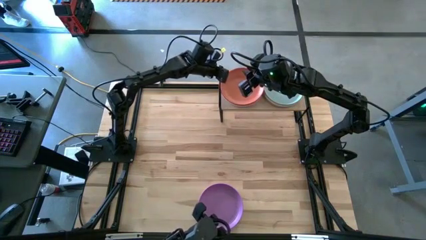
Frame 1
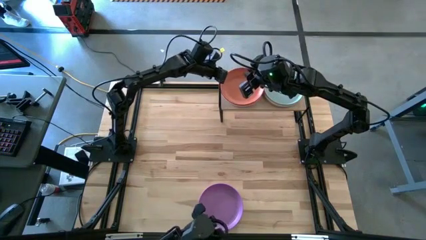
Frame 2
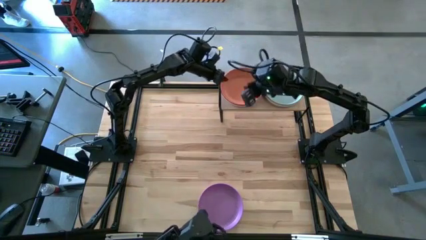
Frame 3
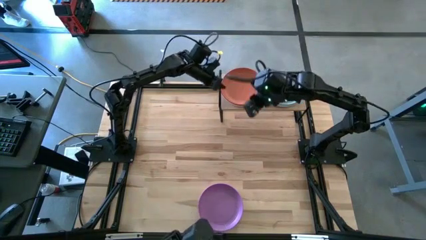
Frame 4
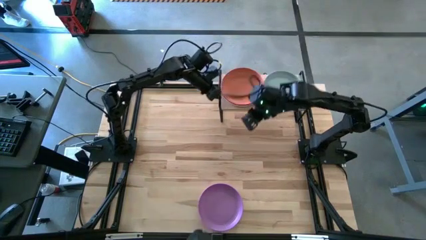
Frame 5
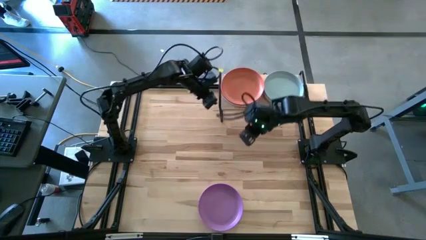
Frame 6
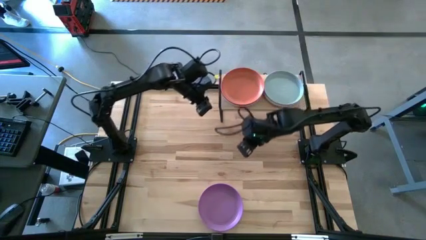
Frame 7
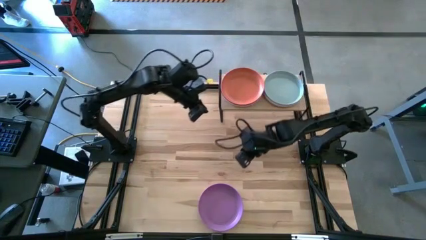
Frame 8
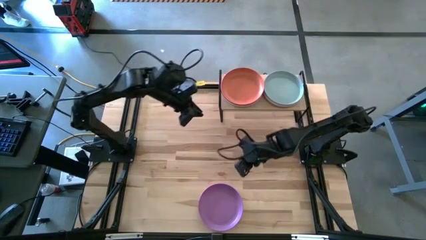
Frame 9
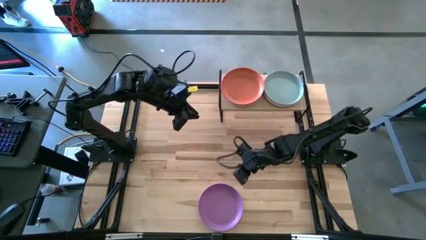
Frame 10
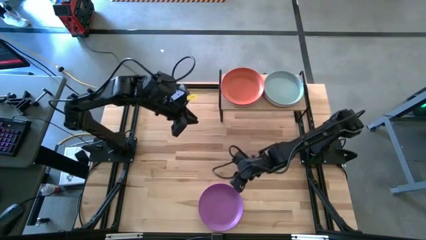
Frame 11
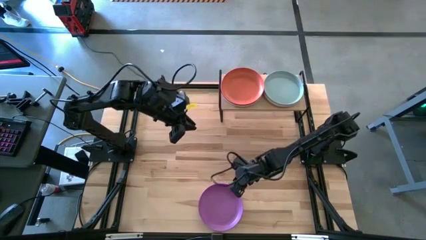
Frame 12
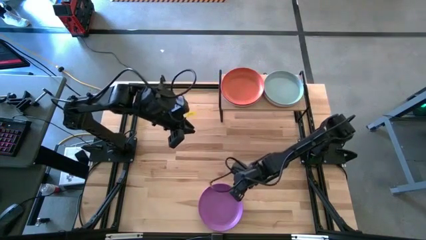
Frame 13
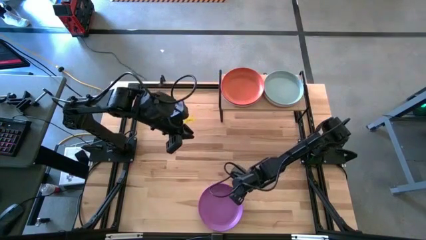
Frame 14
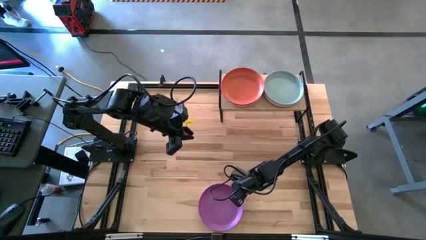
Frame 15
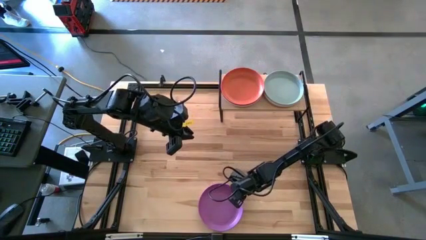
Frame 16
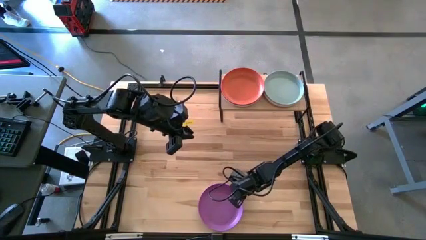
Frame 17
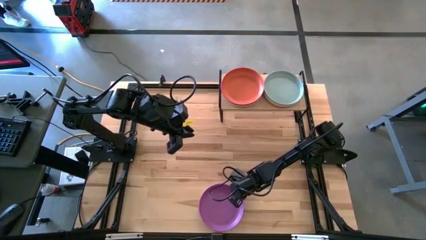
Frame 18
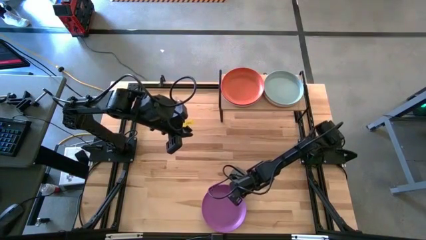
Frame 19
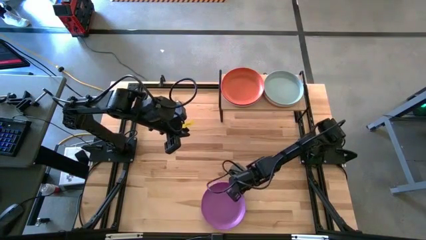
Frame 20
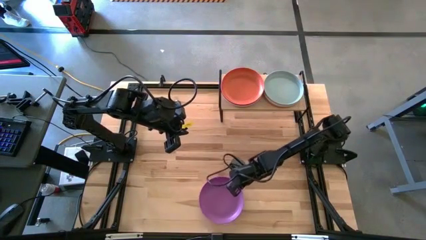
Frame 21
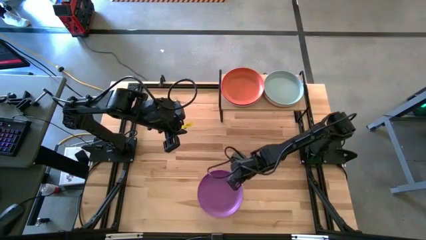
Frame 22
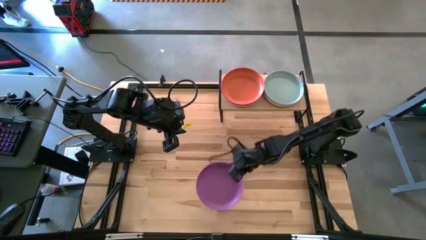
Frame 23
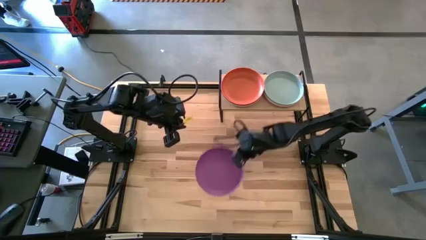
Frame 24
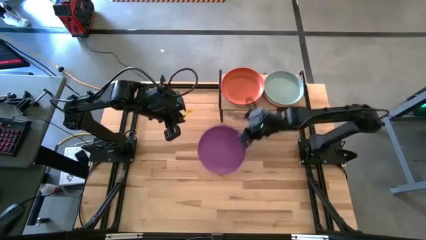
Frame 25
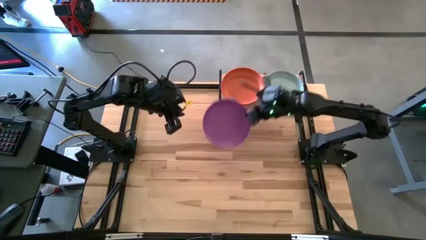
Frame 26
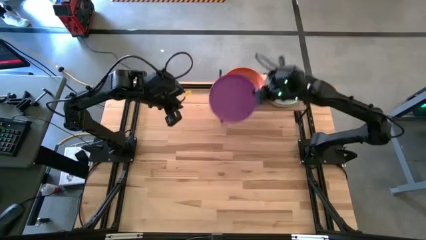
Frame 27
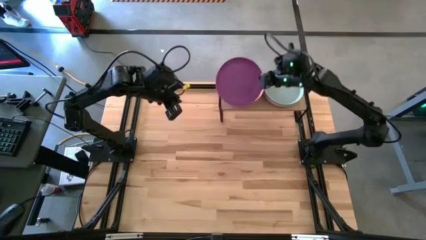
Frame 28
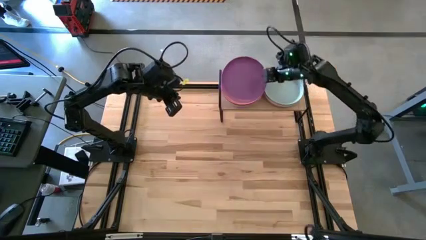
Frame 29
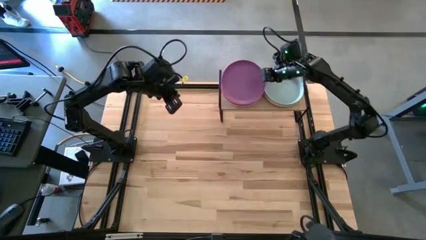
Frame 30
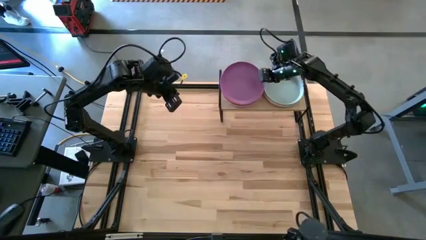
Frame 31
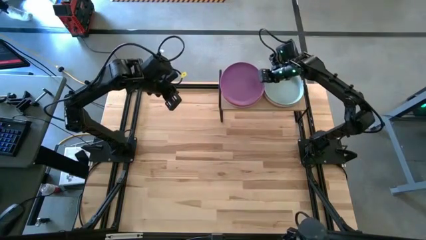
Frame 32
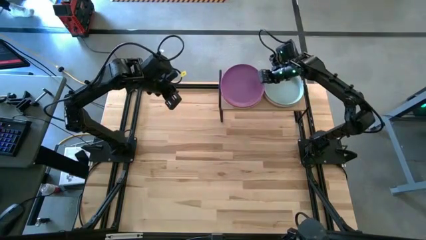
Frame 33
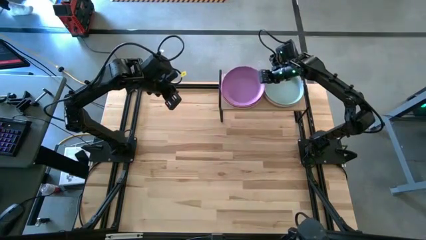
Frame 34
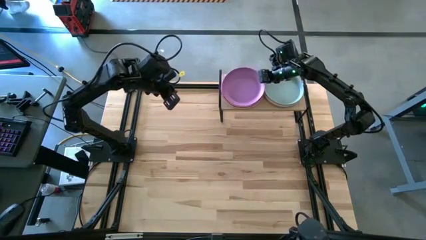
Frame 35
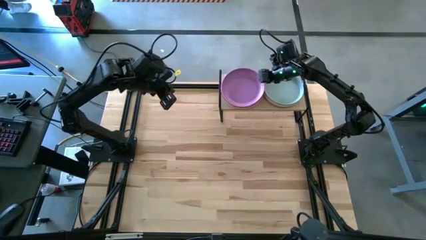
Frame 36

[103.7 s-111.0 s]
Task: Place and stack plates onto a shelf
Stack the purple plate on top of the orange plate on the shelf

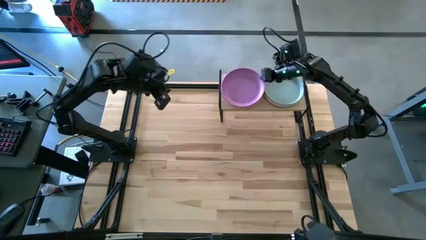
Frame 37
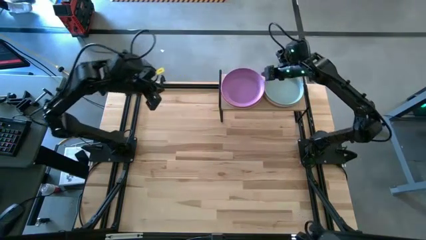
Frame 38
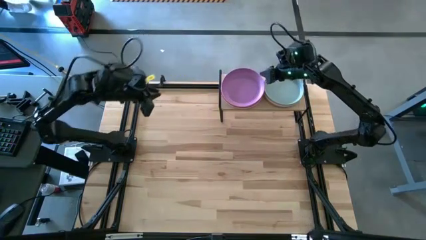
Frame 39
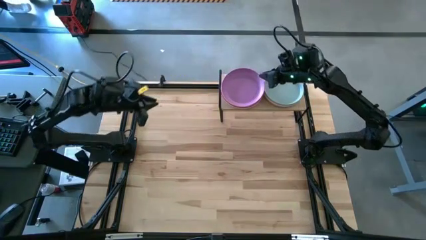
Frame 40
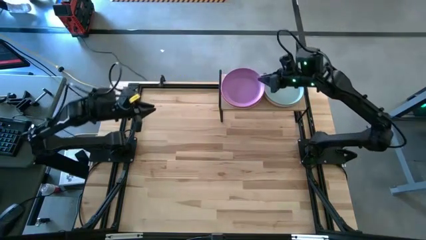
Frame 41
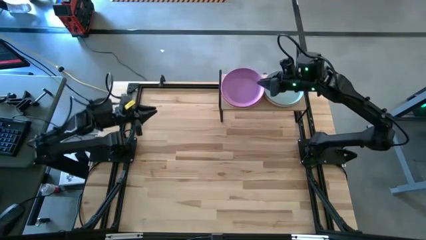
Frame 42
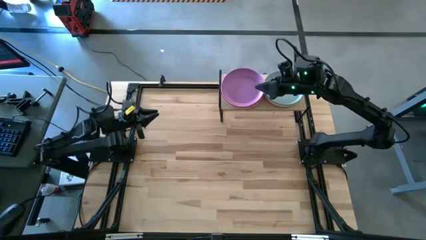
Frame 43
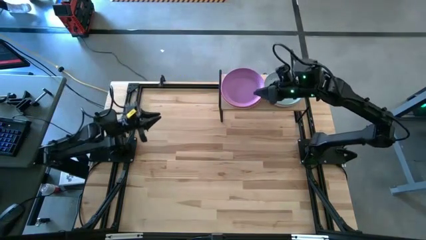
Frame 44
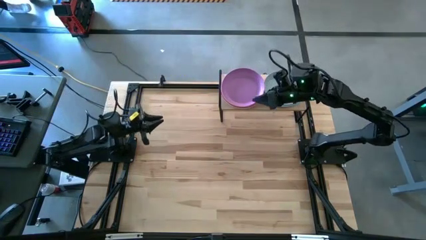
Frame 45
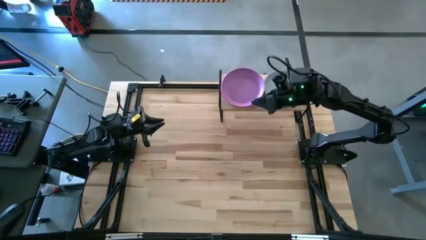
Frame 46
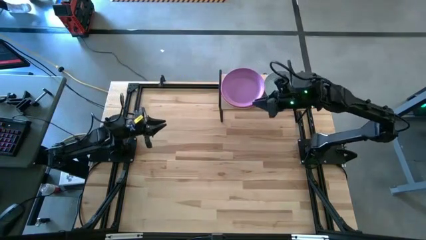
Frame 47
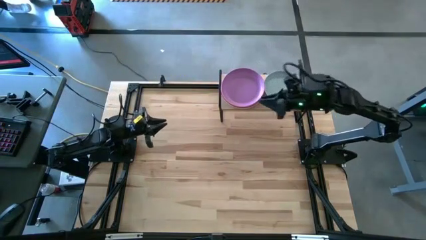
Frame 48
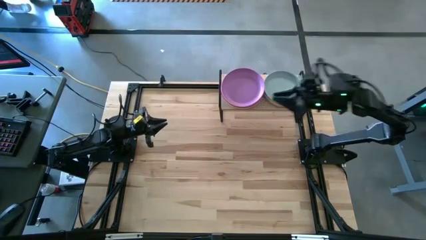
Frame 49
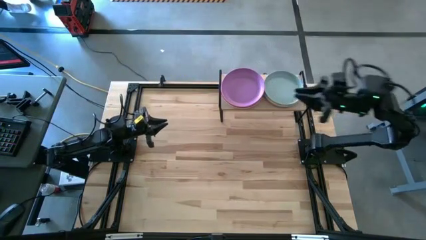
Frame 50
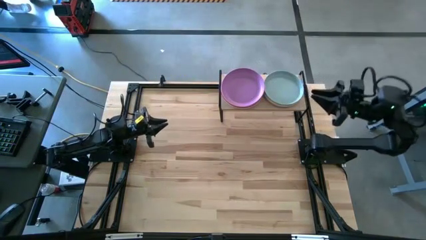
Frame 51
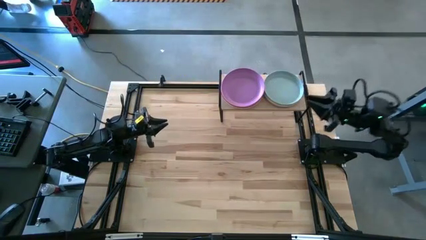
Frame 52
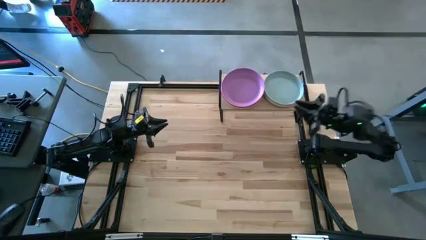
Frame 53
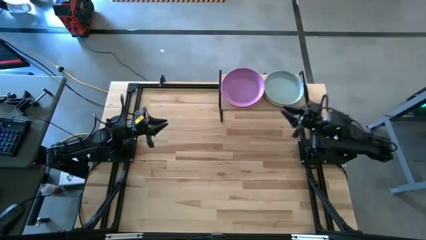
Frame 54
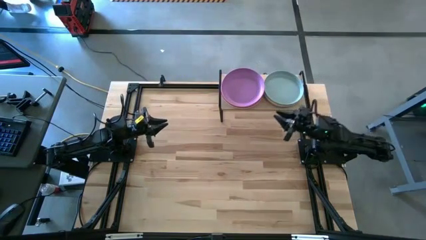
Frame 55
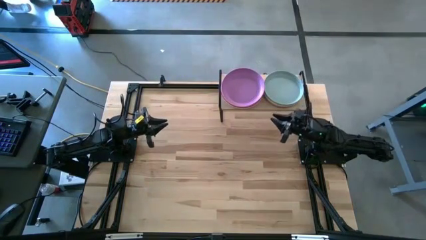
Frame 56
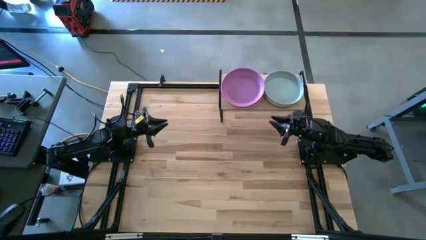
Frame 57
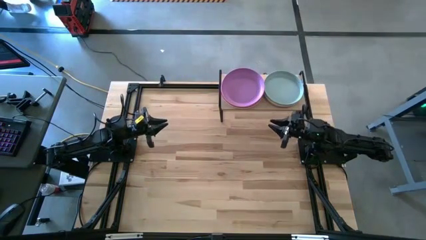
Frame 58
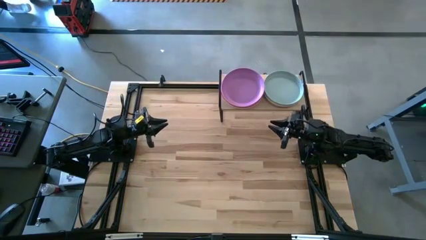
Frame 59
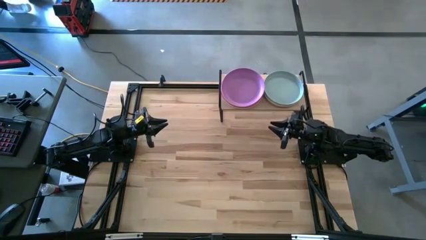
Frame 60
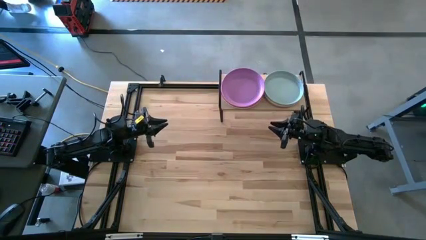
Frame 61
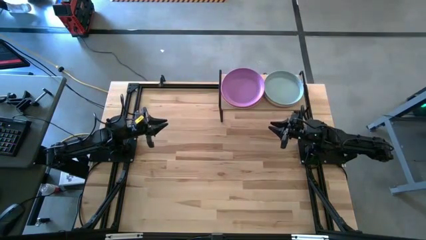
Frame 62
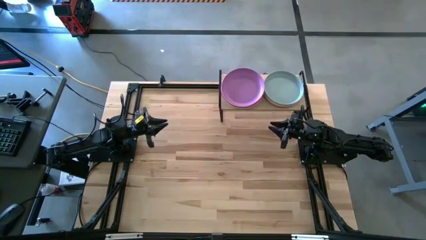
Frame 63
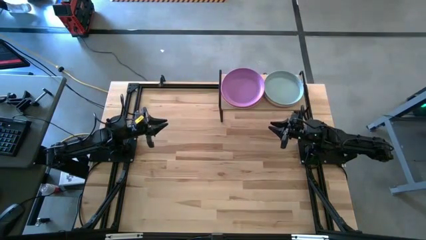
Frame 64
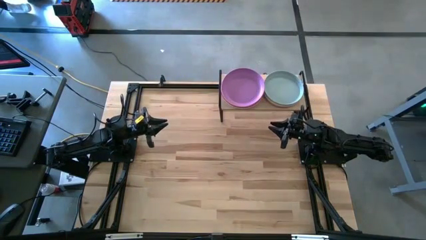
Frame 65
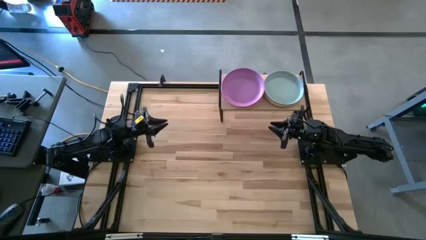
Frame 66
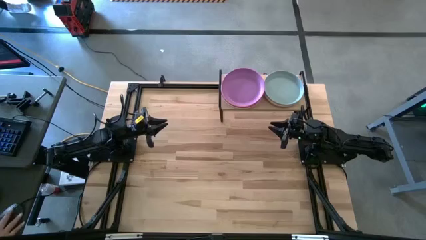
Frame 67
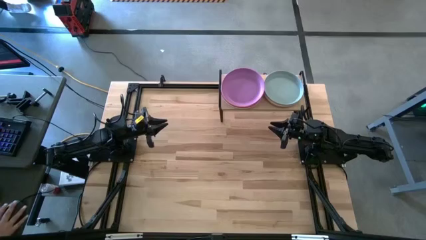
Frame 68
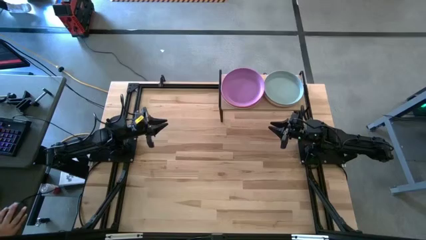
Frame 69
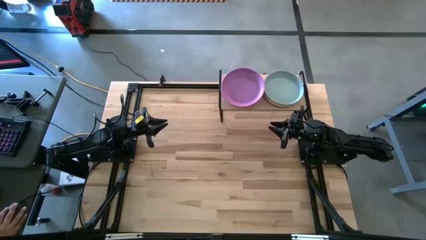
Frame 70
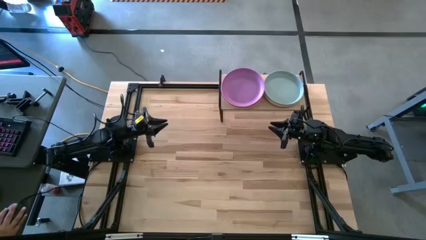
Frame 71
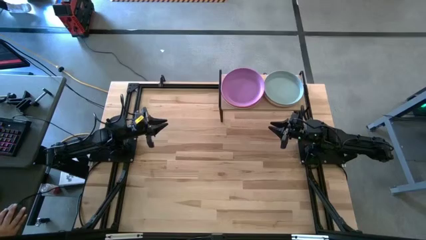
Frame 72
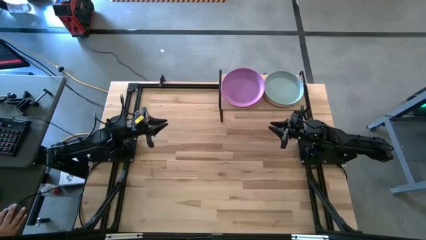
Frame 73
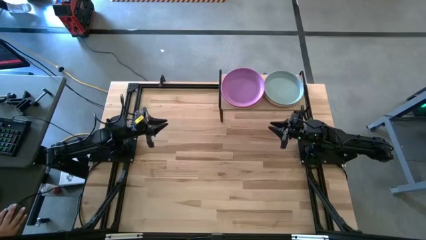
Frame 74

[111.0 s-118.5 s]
Return to Home Position

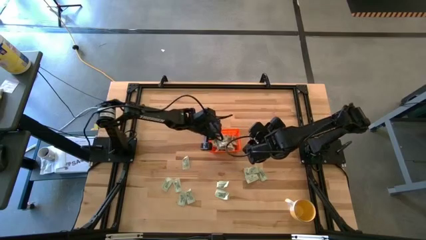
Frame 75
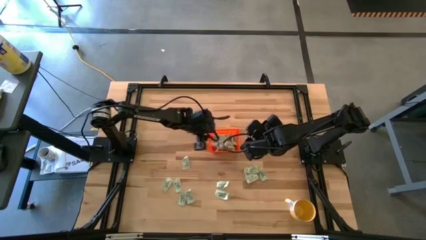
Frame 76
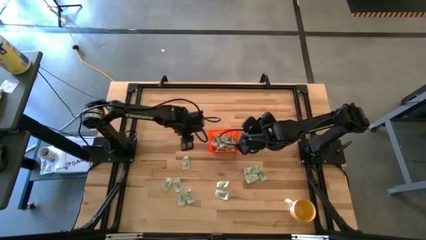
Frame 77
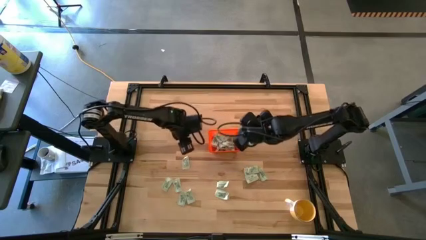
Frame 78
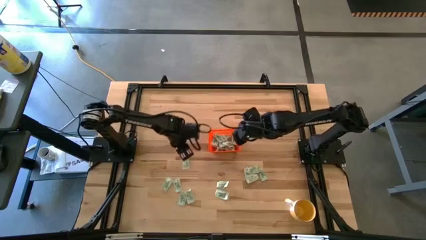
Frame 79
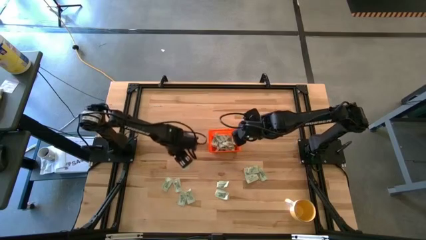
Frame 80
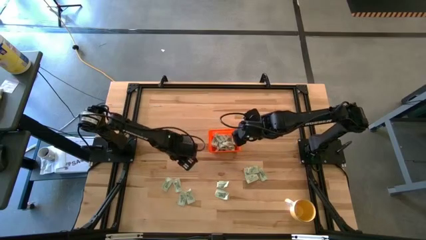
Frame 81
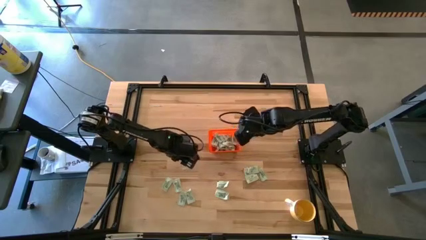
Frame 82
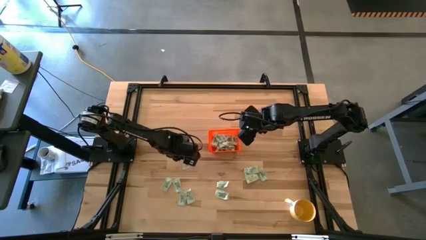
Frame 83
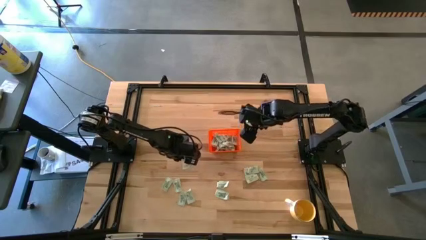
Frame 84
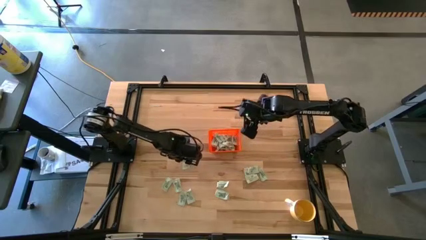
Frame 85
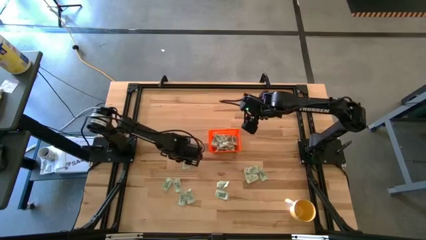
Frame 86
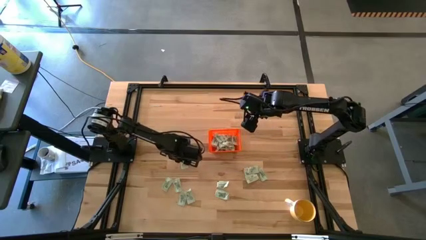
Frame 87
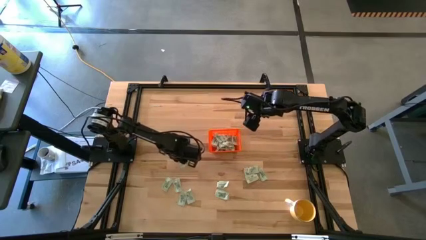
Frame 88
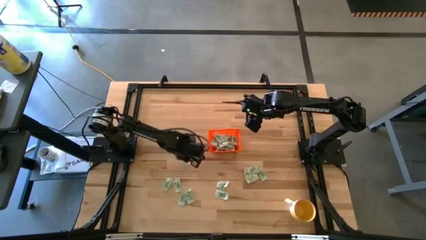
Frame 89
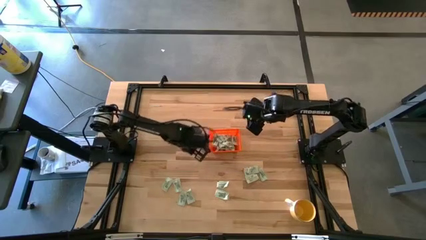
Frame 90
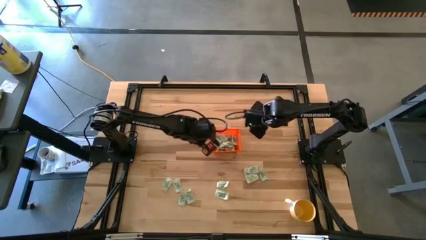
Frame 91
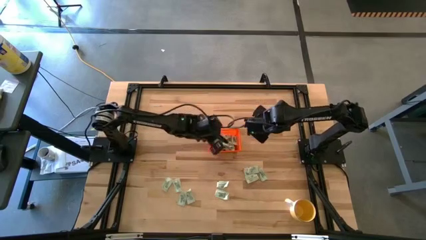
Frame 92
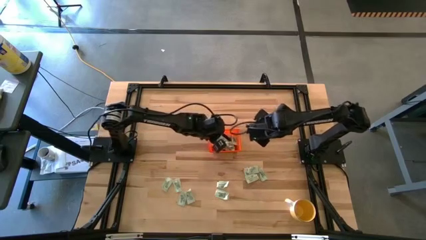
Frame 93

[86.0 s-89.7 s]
Task: Pick and place Stevia / Truvia into bins
Put the light green stevia packet into the orange basket
